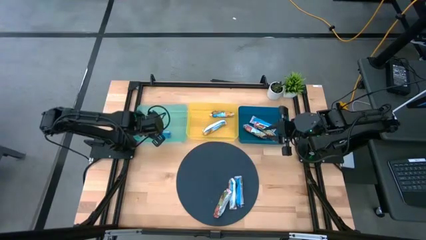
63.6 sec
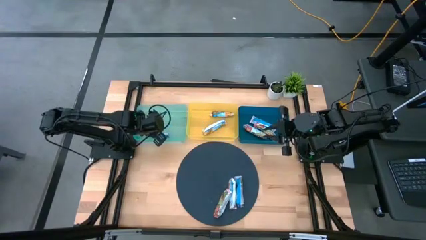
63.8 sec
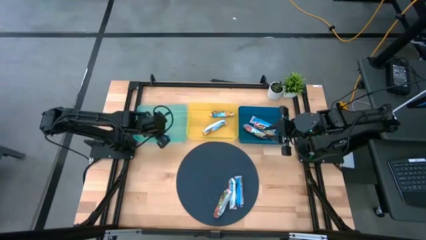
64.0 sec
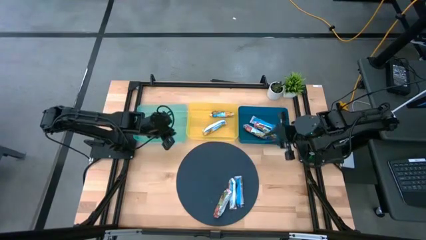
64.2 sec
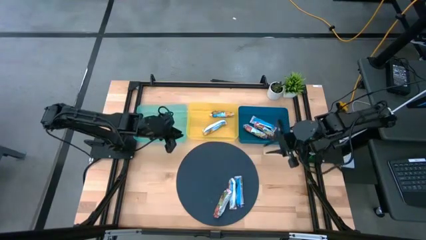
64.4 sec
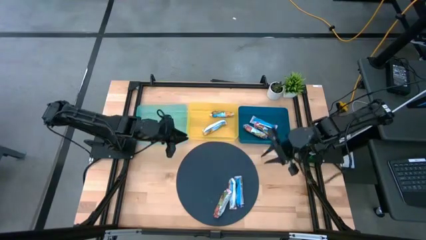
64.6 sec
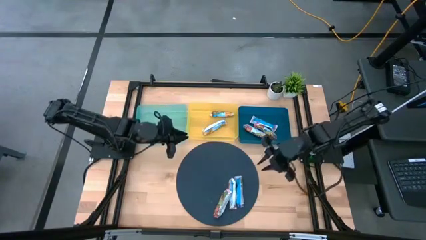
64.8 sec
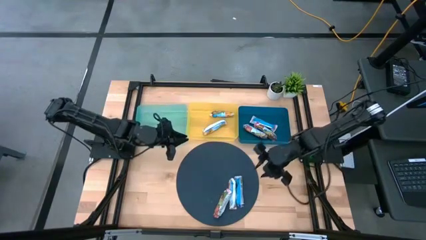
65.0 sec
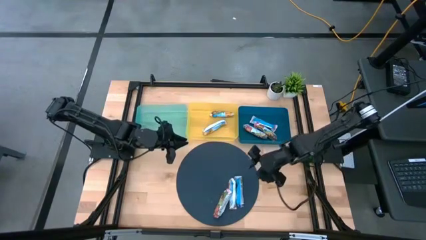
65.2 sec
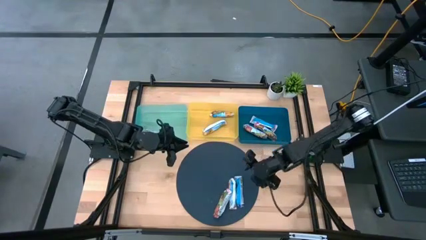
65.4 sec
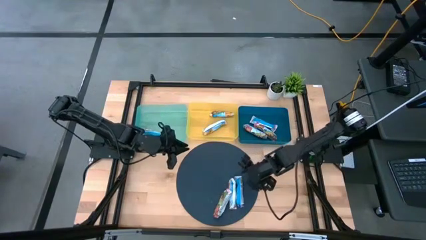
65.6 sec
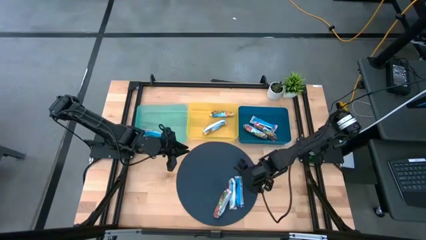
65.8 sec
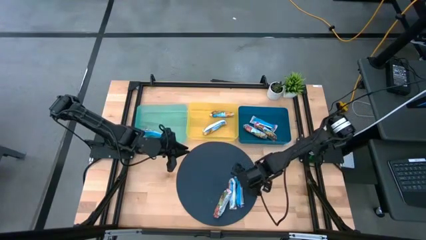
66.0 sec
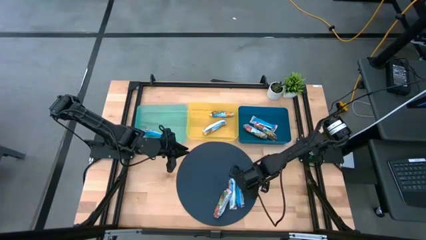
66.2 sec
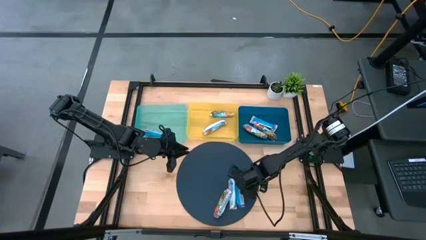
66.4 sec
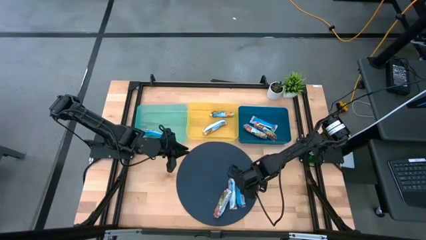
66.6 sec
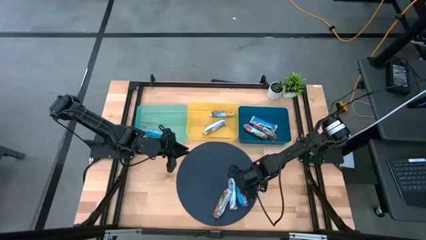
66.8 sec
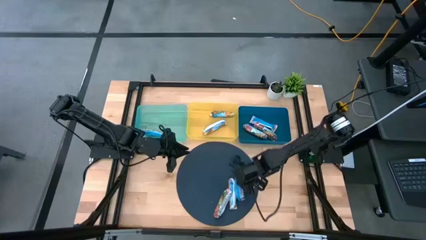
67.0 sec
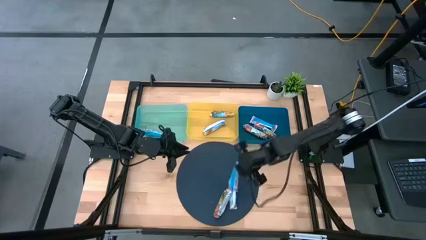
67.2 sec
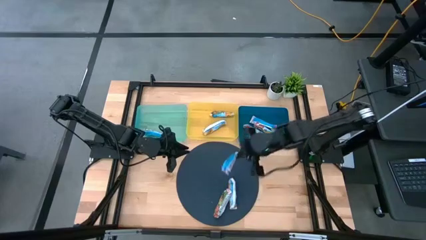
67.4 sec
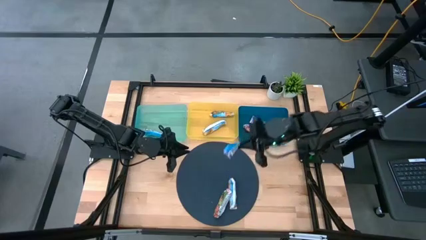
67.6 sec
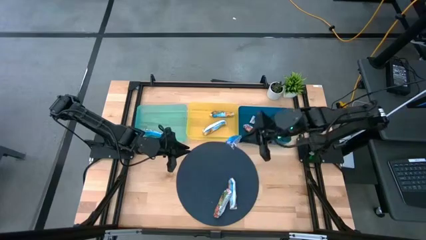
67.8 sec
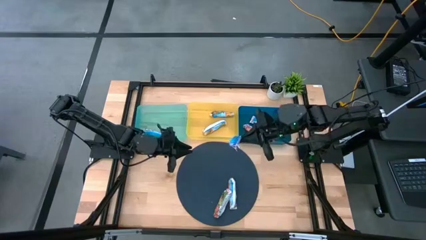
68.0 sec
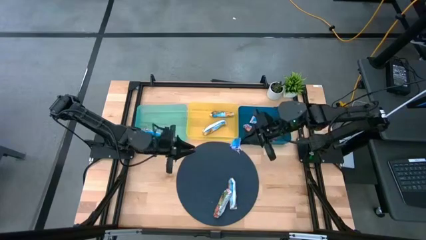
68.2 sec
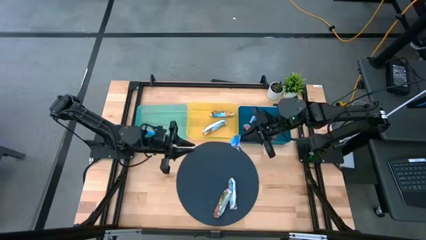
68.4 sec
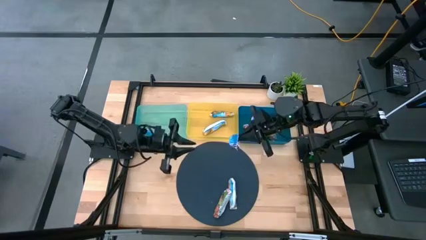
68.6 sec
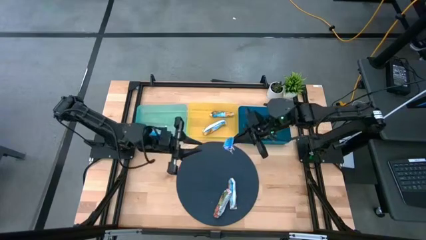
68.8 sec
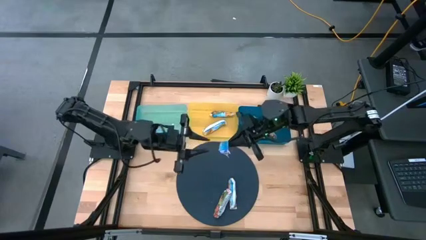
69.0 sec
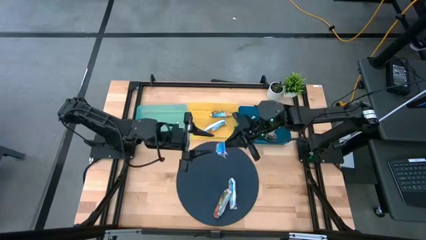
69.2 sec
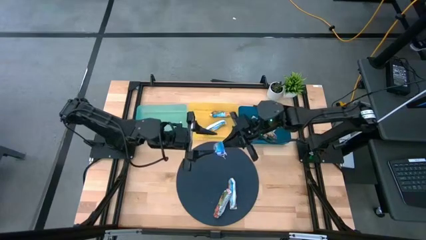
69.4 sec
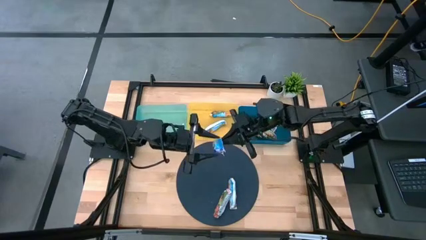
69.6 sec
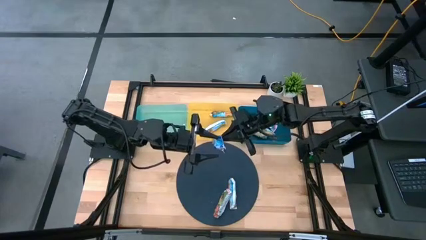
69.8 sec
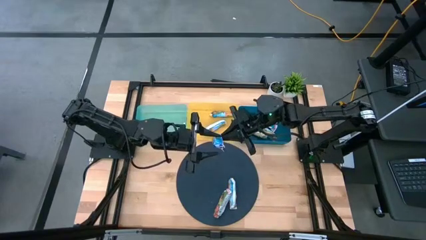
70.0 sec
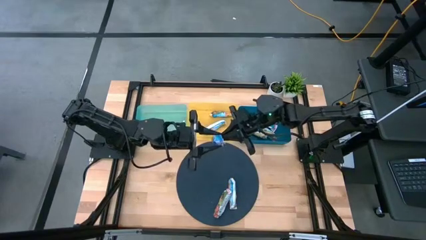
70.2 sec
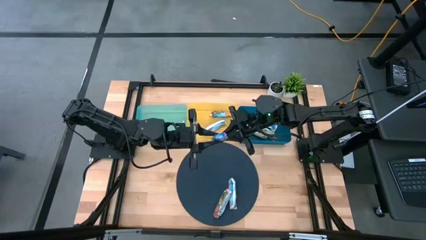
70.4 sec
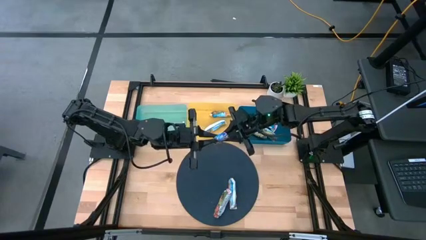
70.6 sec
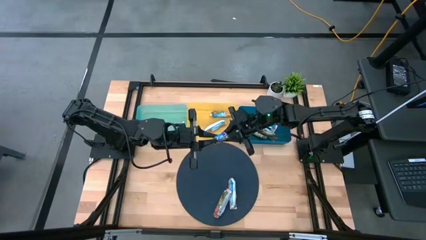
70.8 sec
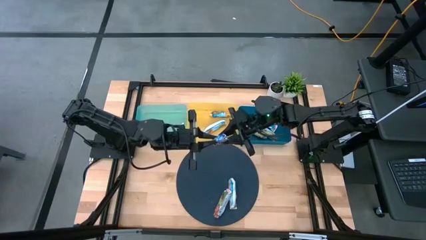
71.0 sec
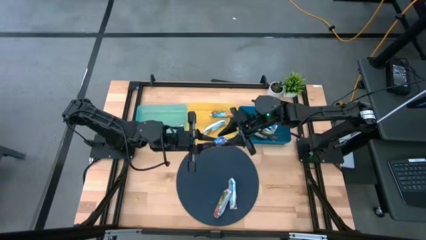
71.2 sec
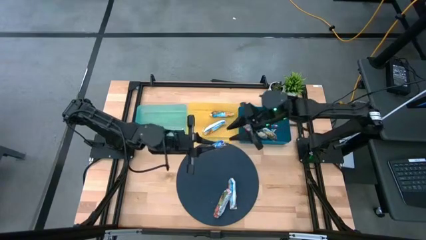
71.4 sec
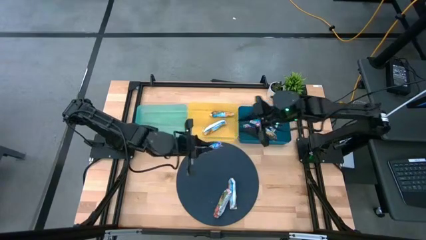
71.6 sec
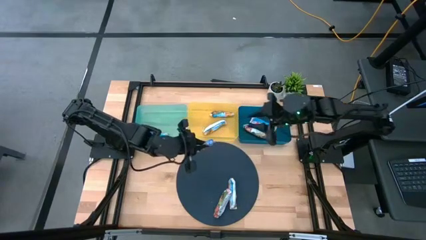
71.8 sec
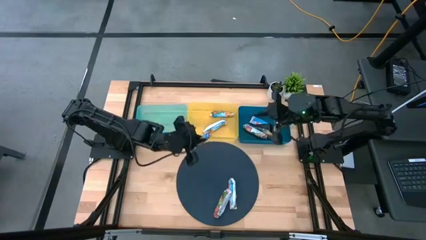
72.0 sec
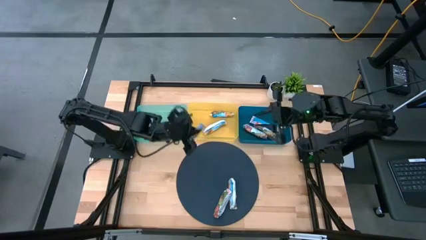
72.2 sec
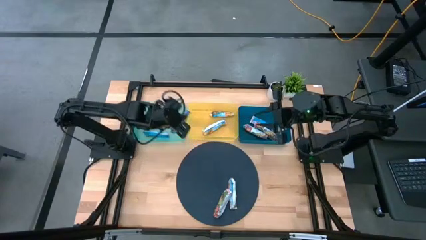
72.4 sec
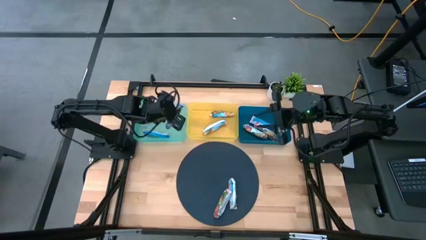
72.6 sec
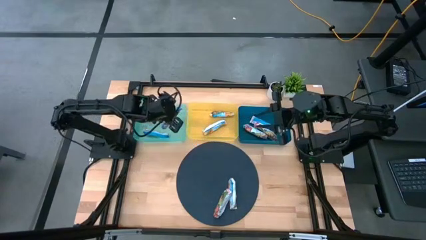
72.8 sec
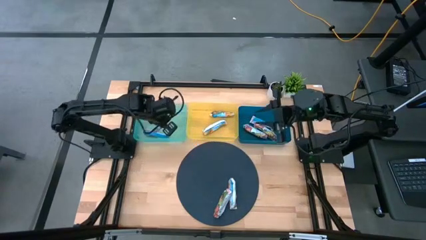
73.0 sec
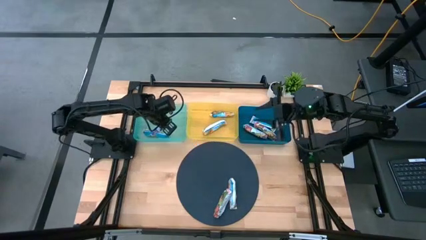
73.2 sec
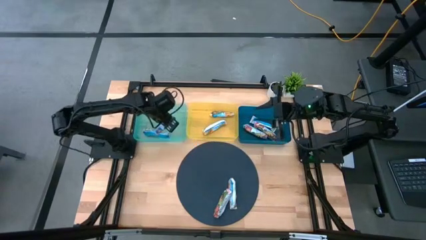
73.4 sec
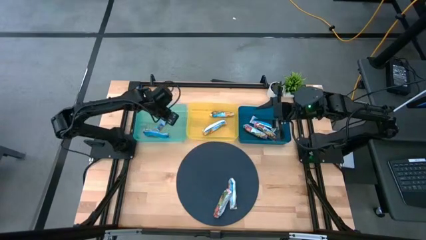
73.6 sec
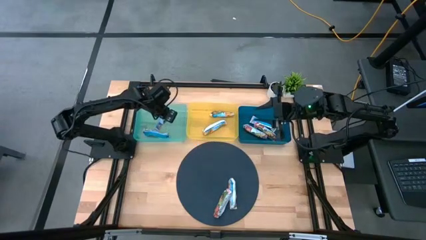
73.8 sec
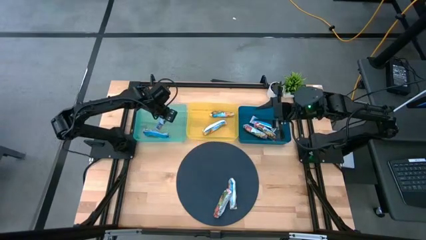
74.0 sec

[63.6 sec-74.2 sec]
Task: Pick and place Granola Bars by type
Put the blue granola bar into the green bin

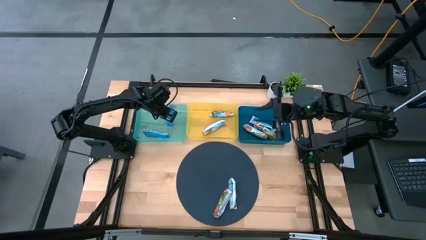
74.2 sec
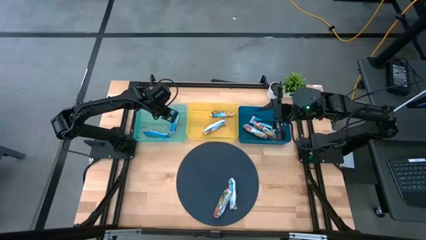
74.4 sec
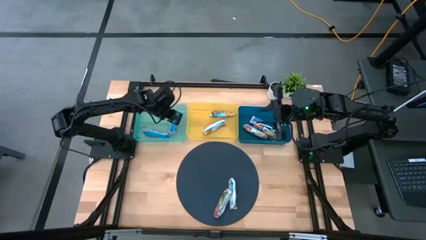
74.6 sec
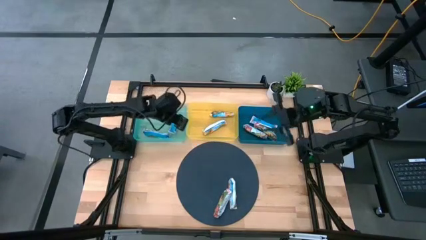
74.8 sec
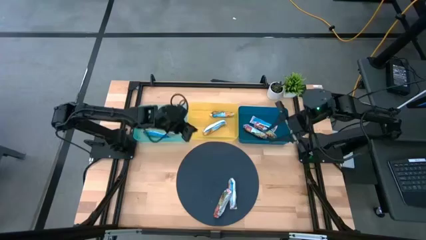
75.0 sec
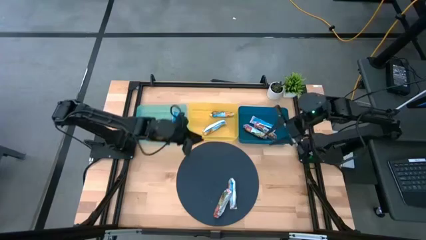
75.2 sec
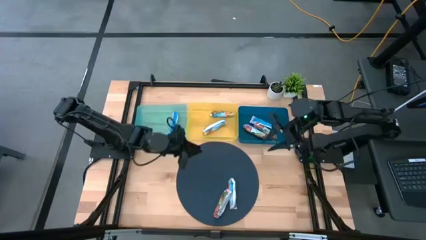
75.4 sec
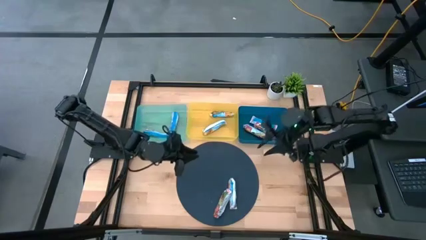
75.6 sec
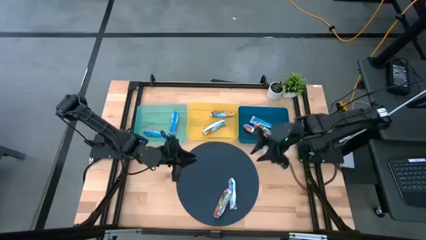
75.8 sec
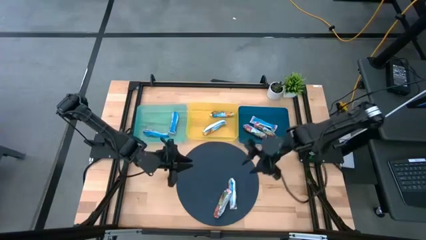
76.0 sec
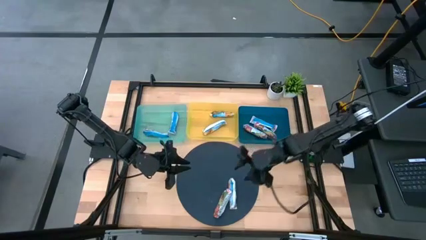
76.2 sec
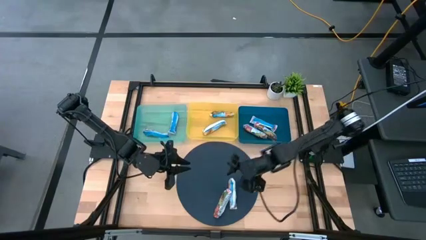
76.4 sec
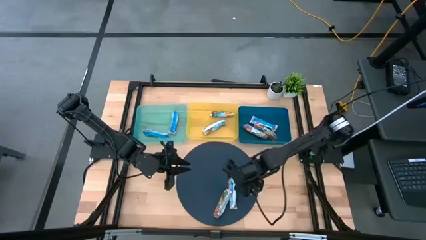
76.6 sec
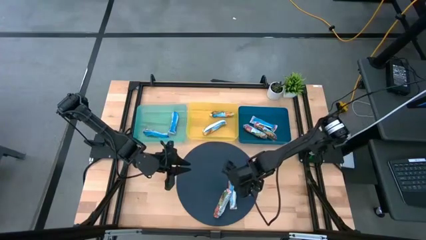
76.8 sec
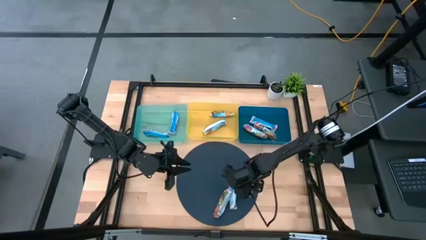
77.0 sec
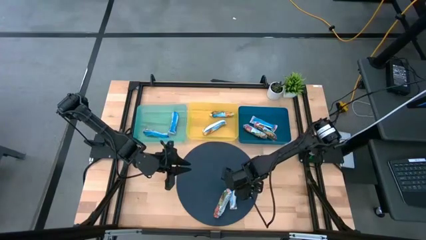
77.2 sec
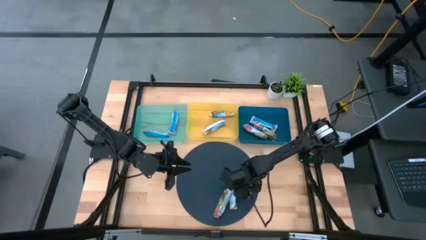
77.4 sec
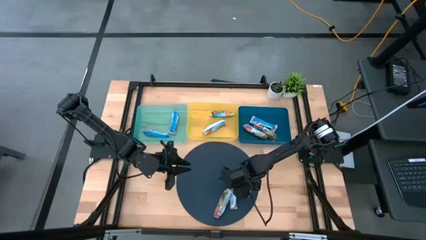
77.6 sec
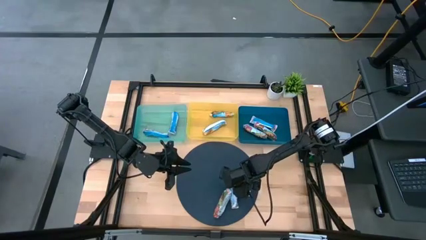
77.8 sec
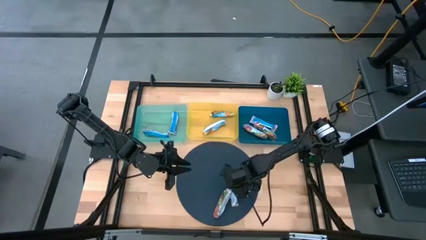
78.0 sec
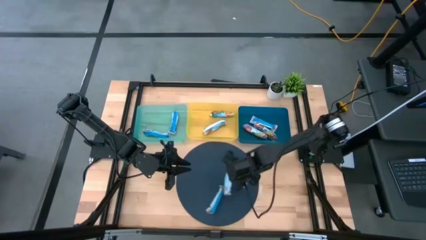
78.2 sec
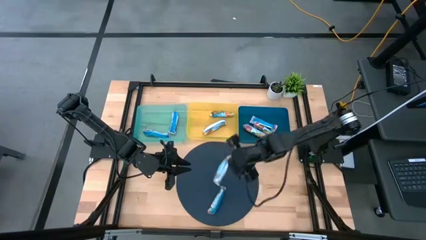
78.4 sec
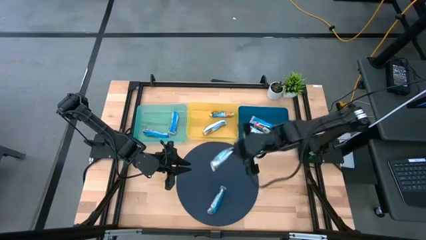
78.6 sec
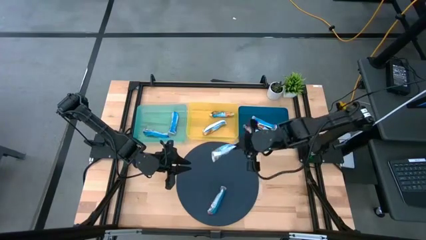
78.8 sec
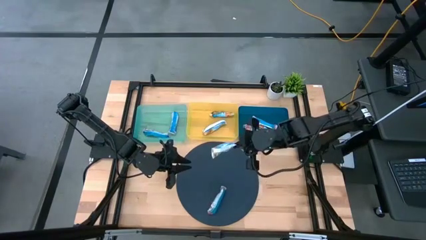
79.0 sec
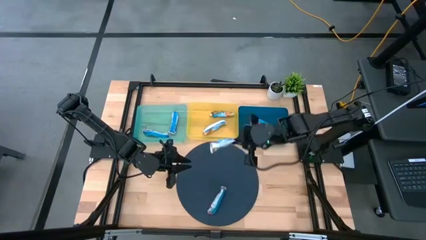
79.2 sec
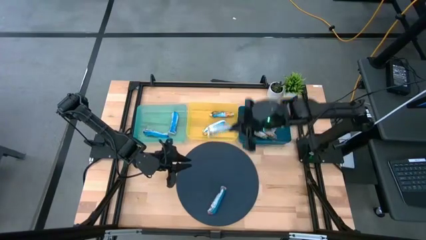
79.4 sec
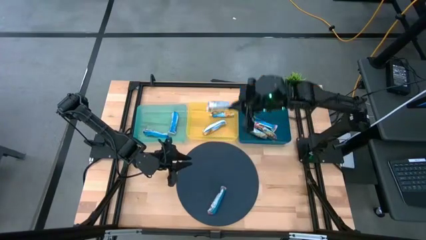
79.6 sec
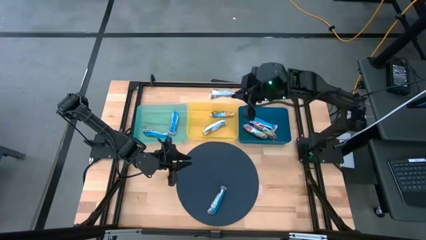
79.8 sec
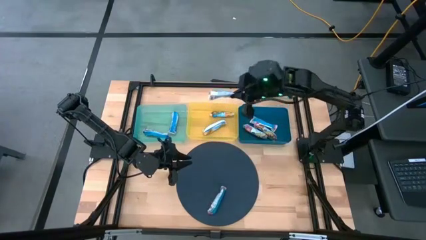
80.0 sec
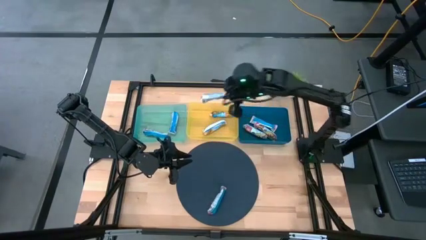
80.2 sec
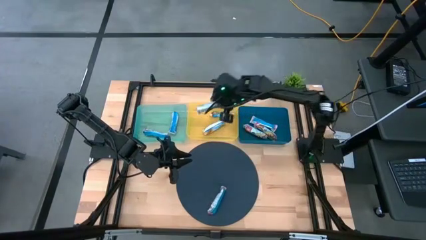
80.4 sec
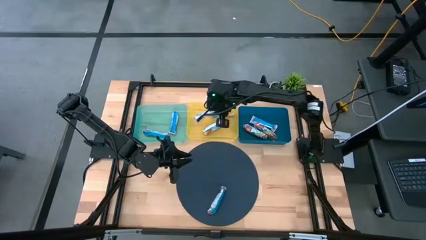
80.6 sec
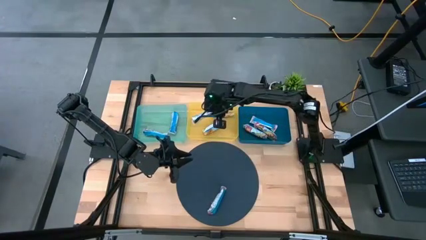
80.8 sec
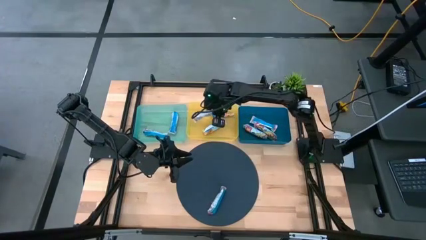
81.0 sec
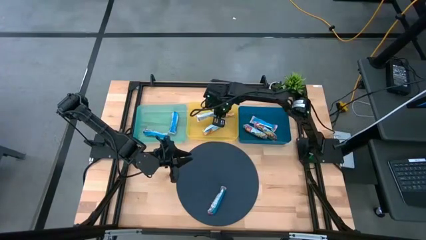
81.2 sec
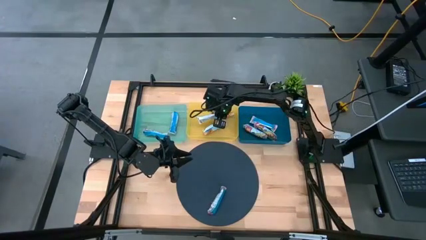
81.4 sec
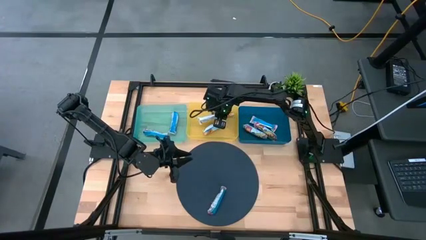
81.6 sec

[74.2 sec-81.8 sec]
Put the orange granola bar into the yellow bin
